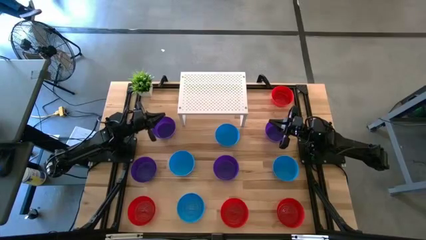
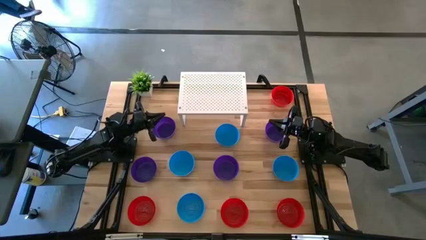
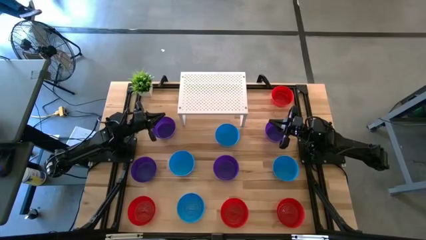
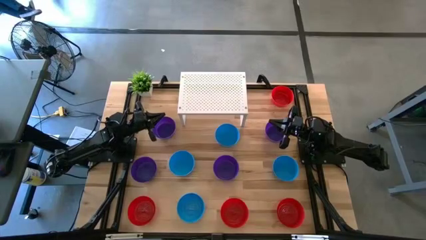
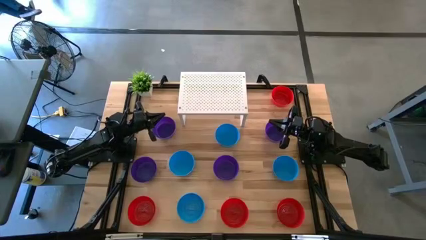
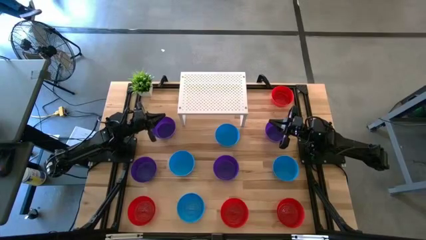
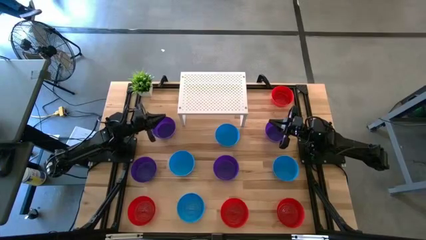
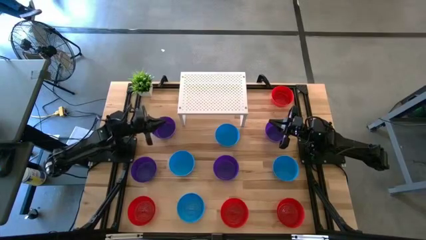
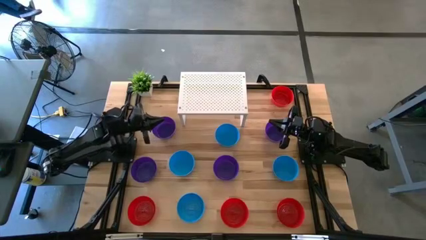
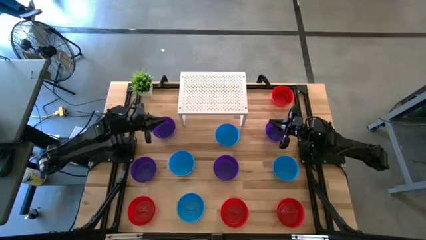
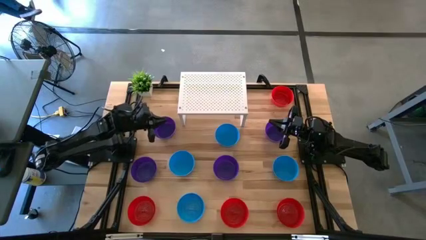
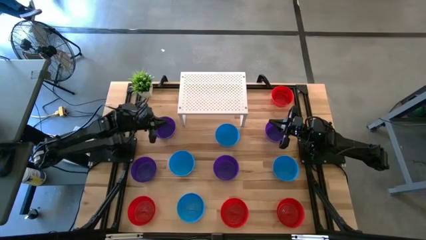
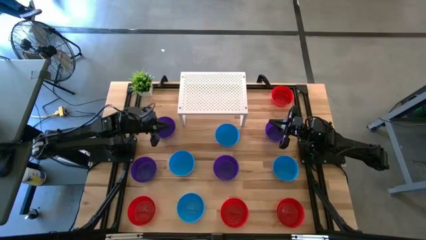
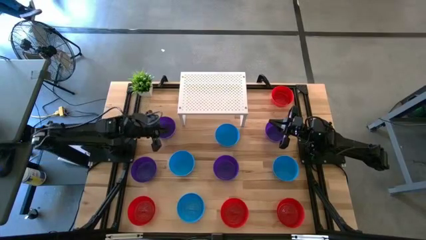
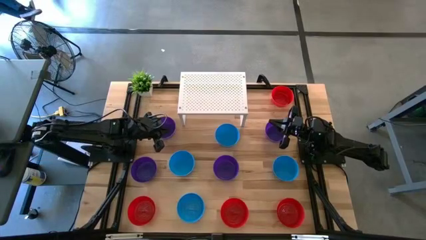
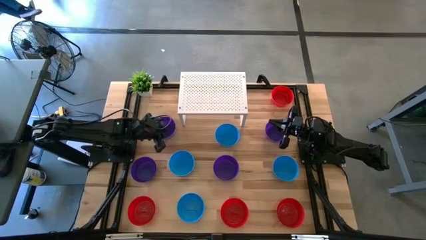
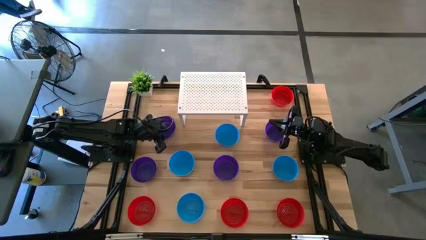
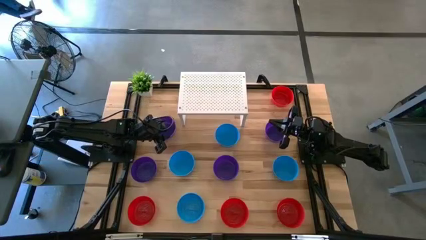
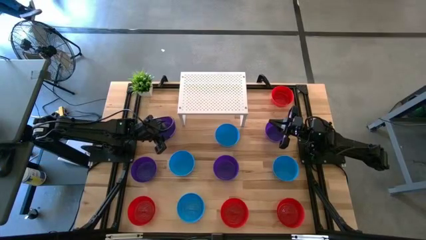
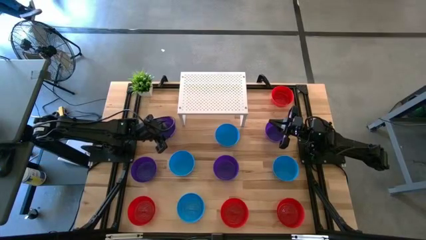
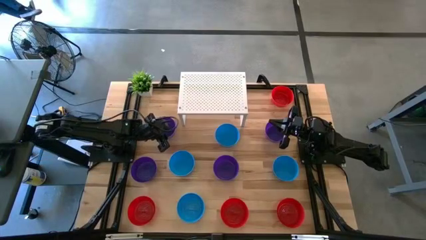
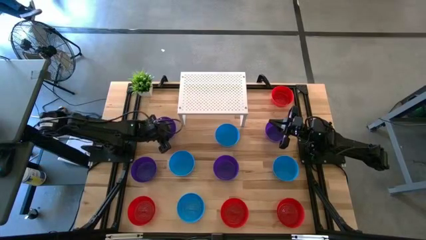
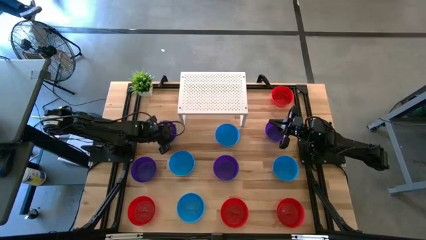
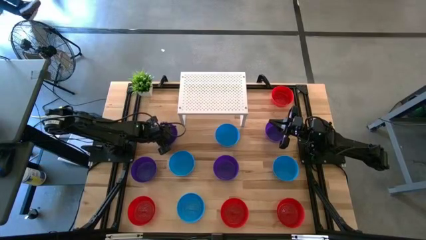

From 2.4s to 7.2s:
Task: Pick & Place Mini bowls
Put the purple bowl on the shelf

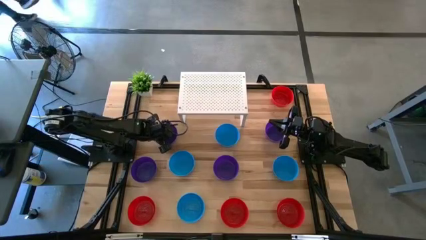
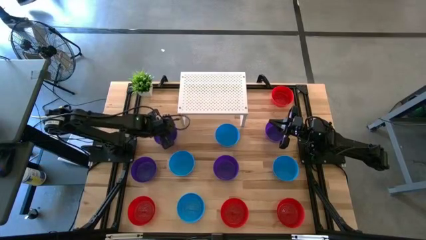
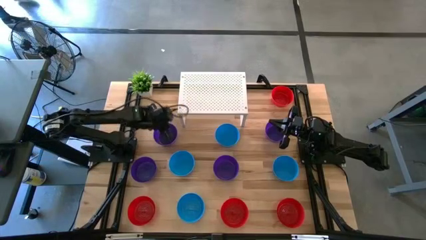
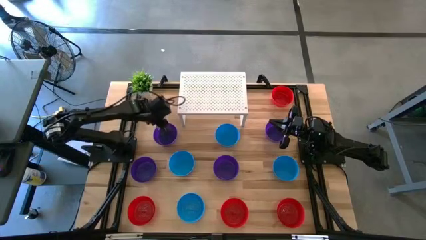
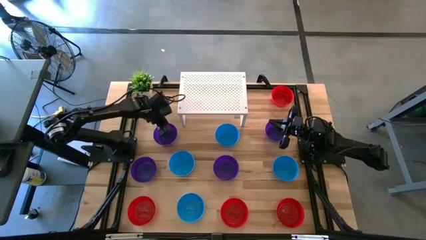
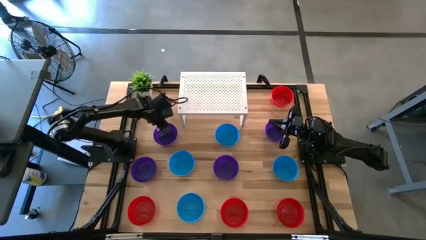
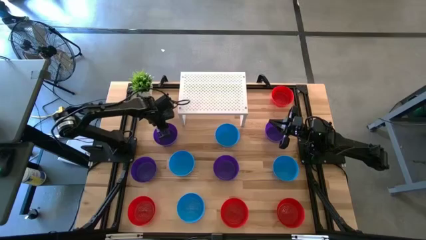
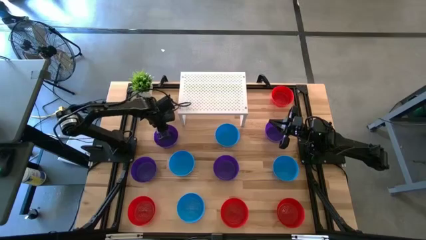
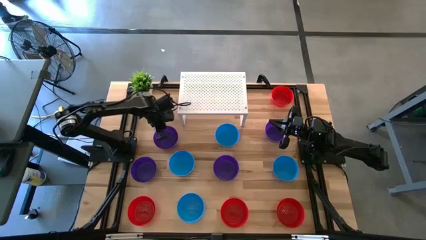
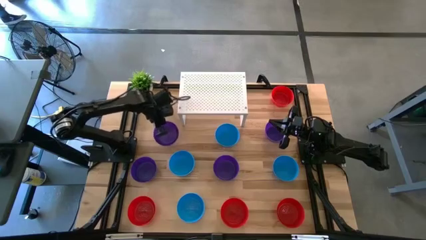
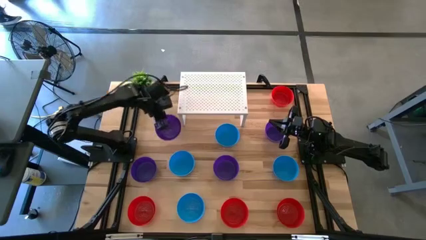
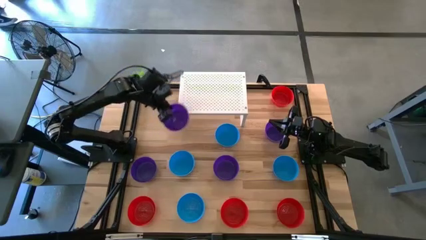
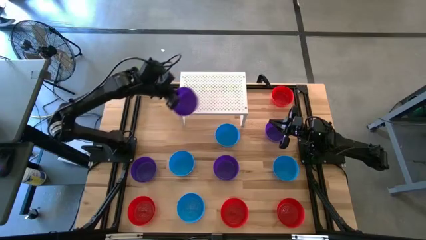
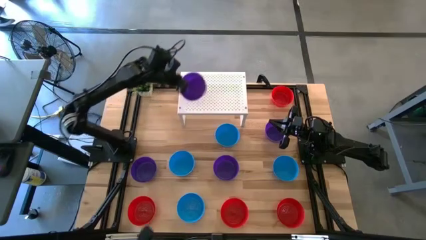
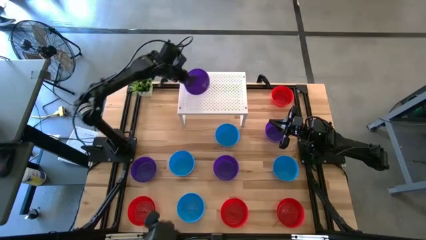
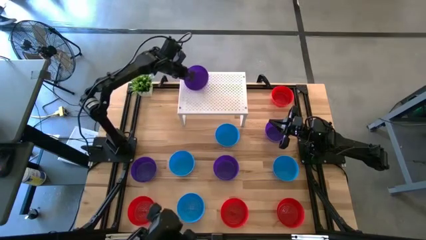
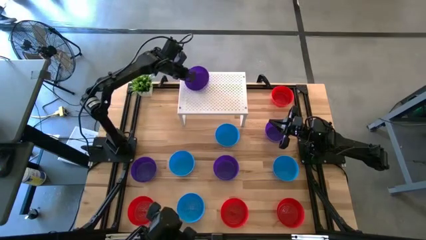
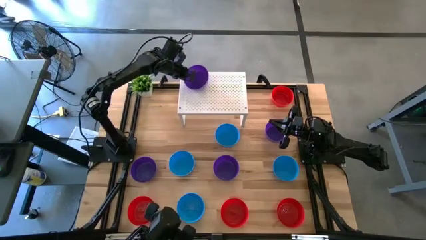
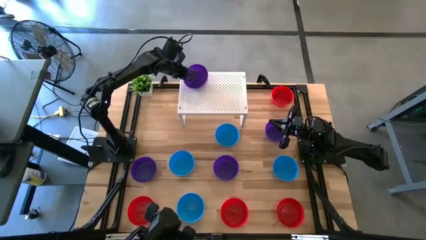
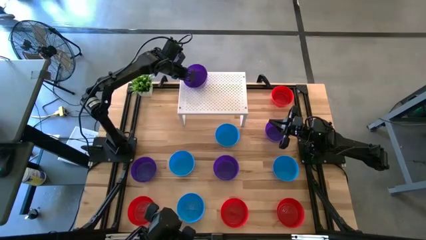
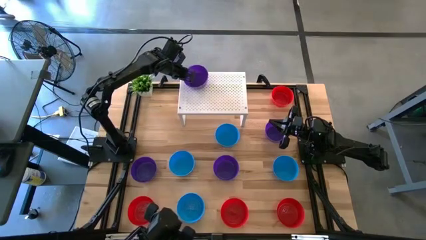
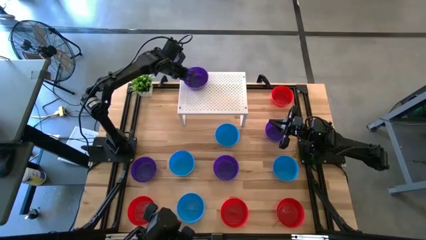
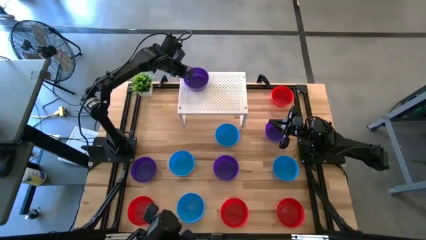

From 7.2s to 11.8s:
Put the purple bowl on the shelf

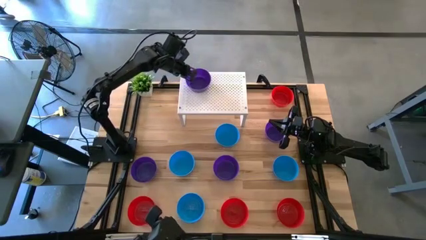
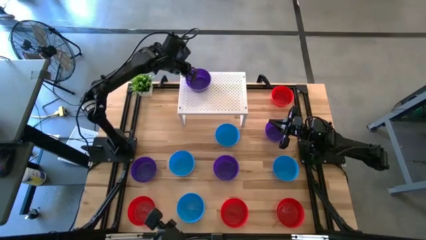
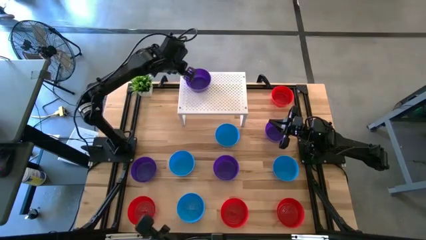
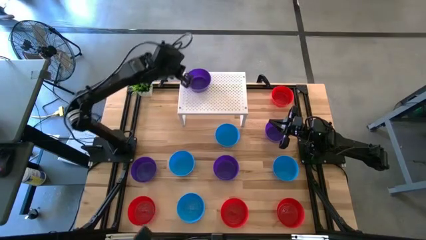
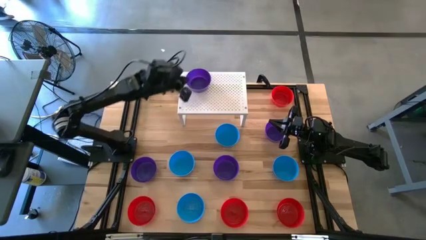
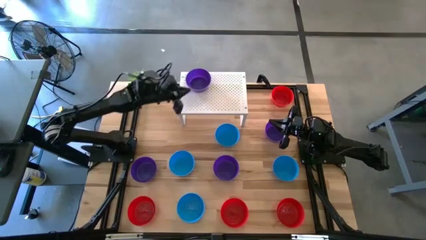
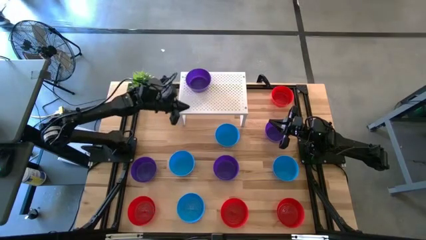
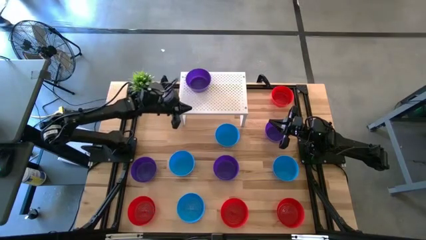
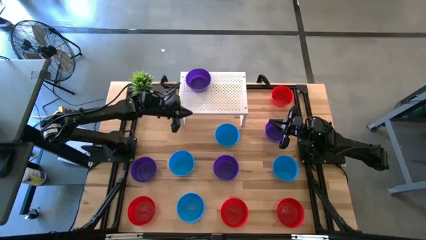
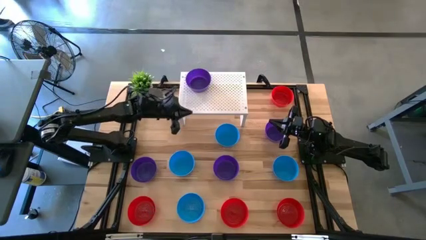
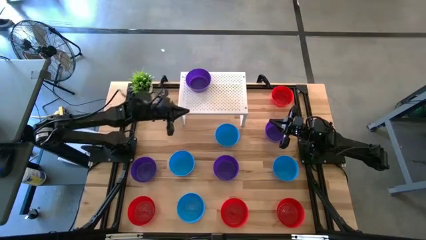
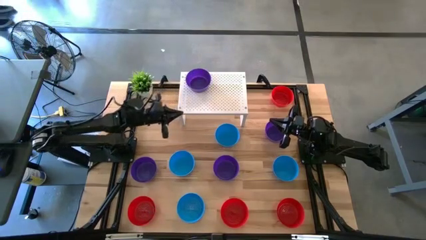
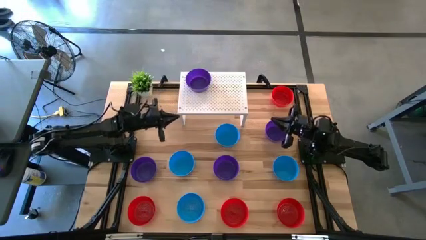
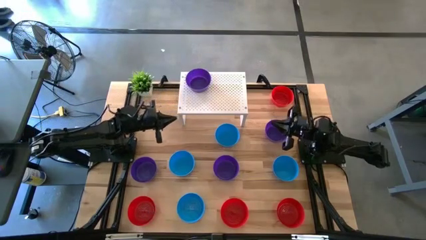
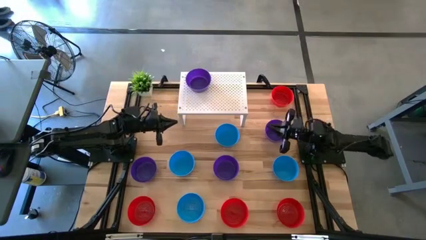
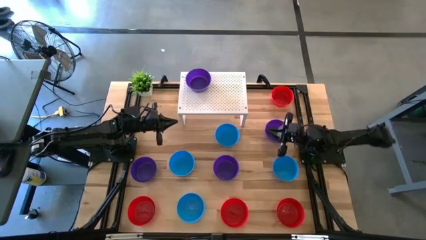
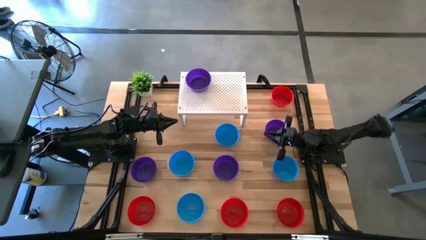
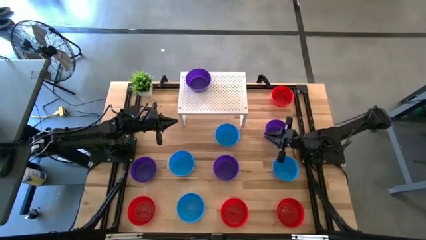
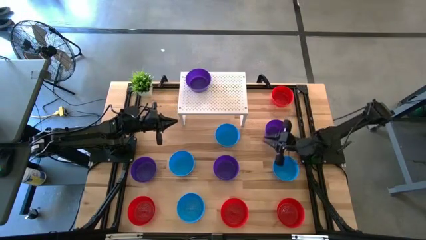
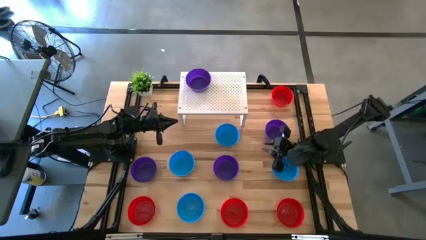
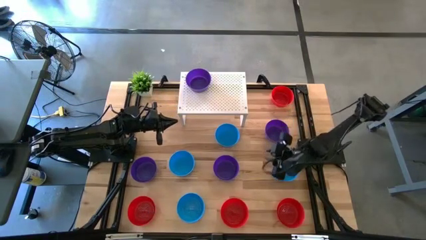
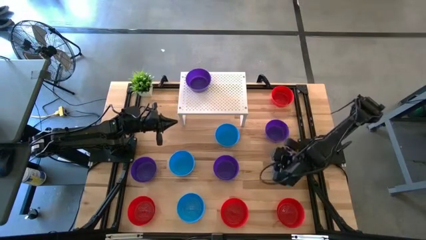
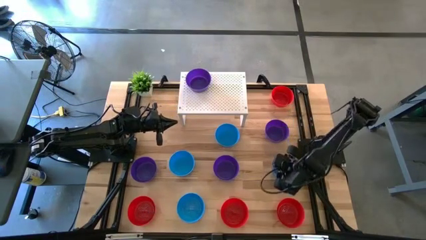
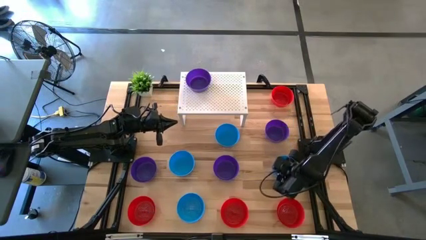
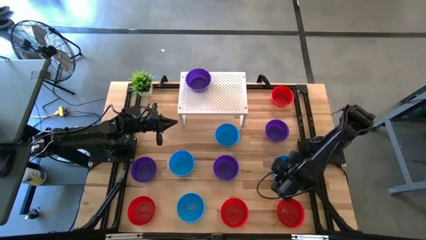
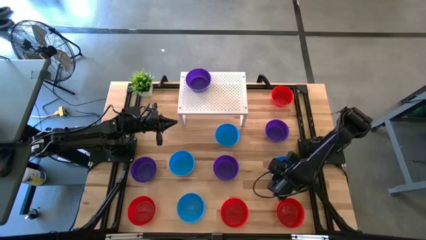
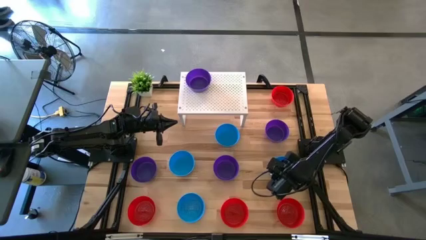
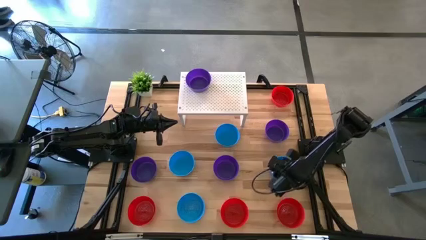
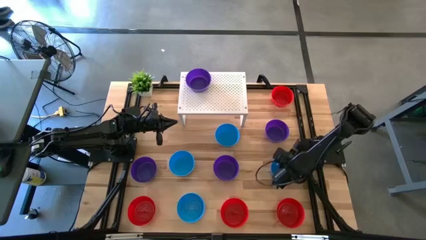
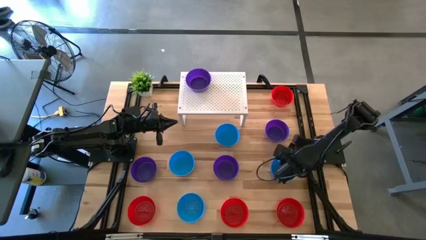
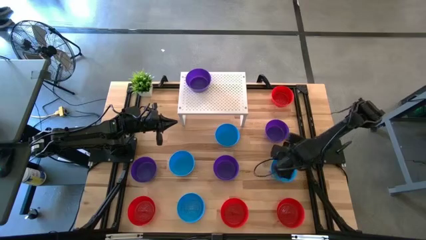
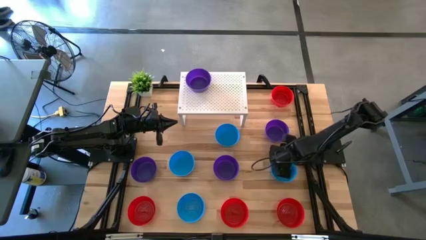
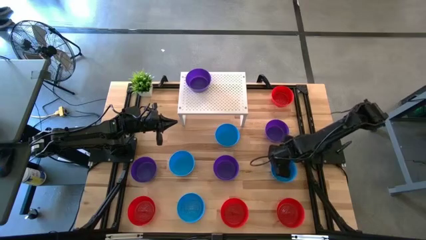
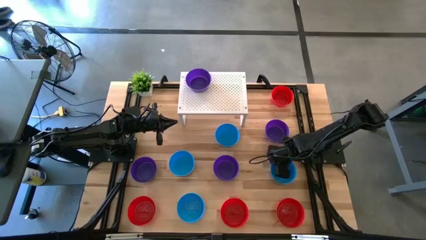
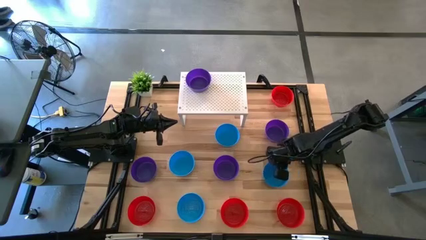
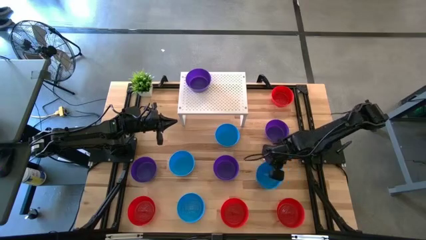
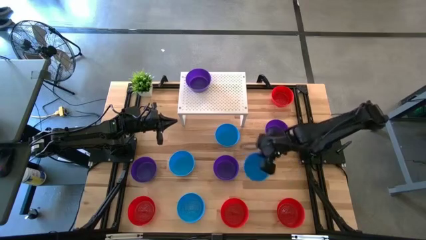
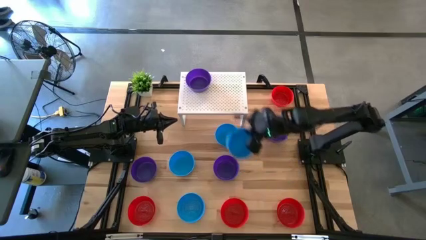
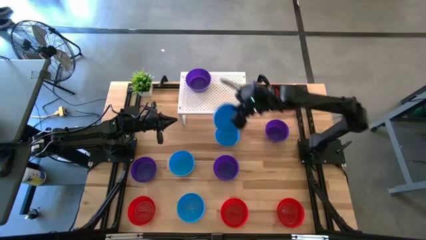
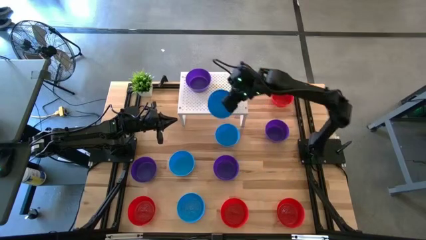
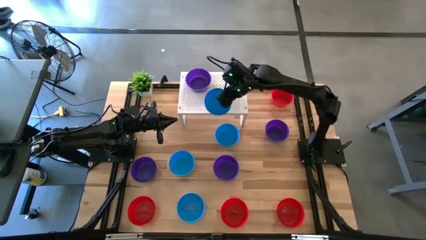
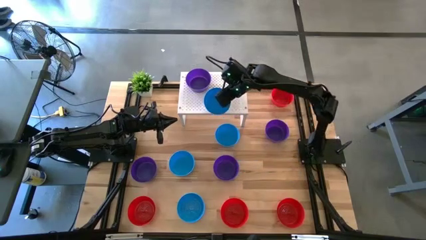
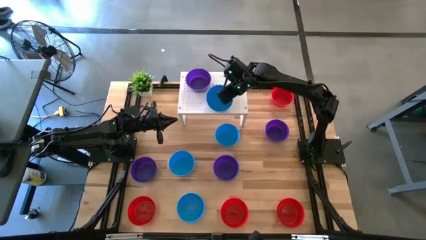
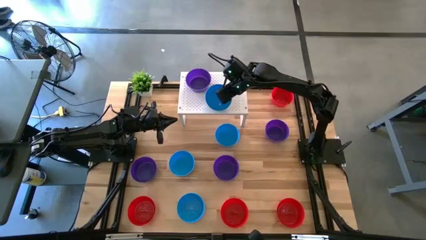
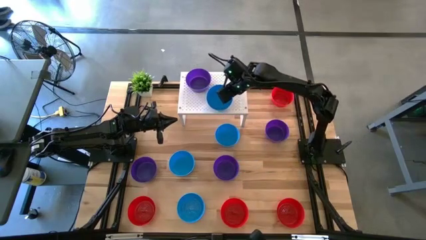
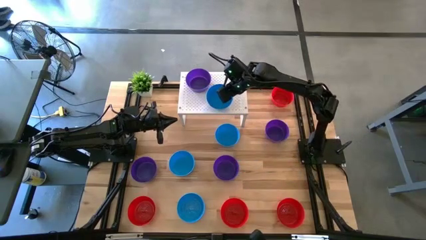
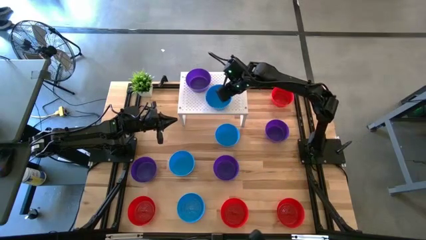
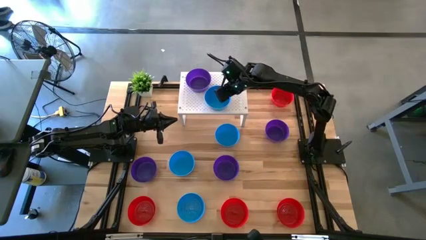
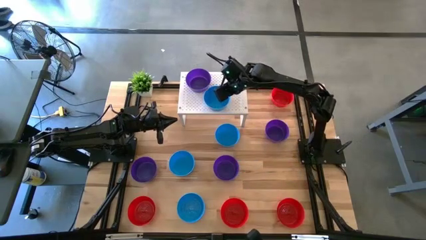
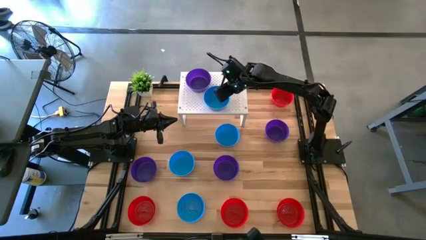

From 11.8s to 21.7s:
Put the blue bowl on the shelf
